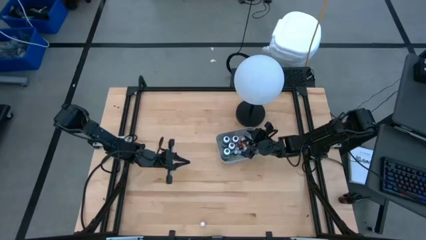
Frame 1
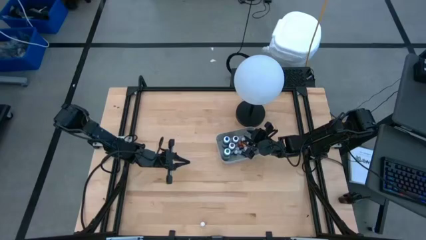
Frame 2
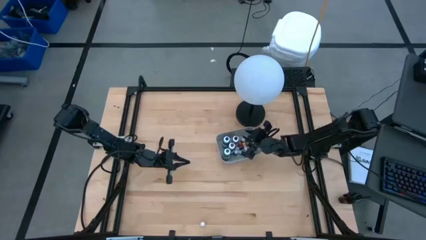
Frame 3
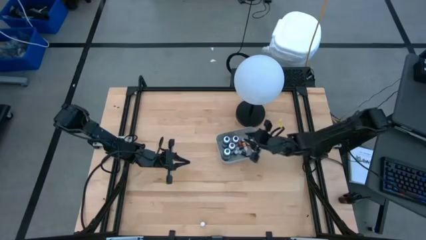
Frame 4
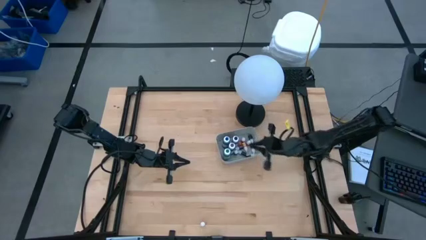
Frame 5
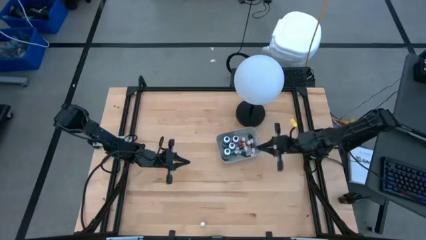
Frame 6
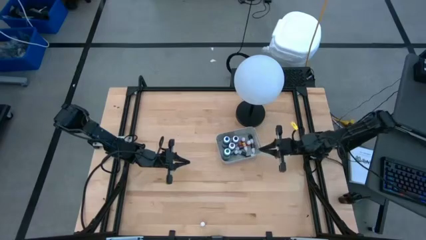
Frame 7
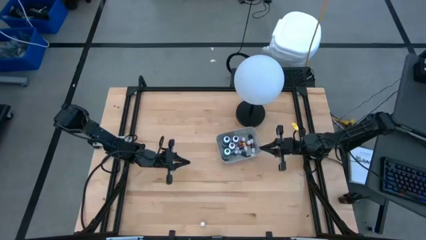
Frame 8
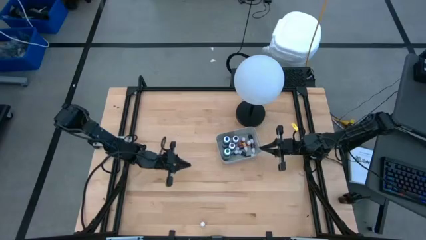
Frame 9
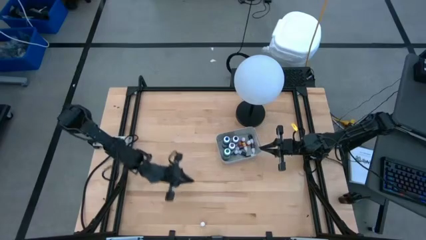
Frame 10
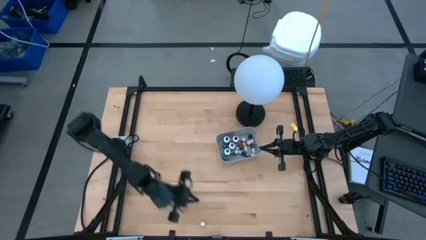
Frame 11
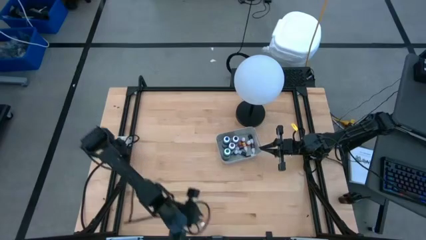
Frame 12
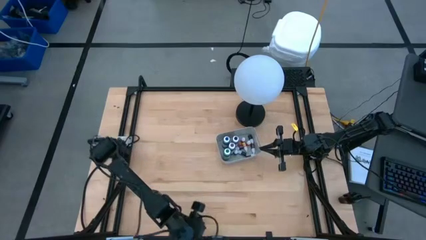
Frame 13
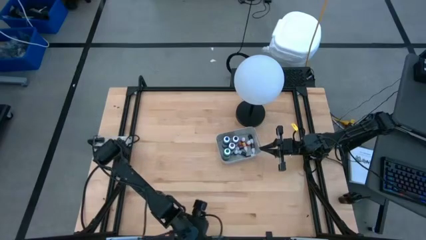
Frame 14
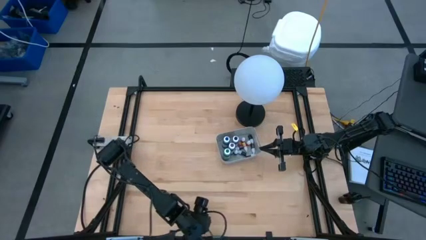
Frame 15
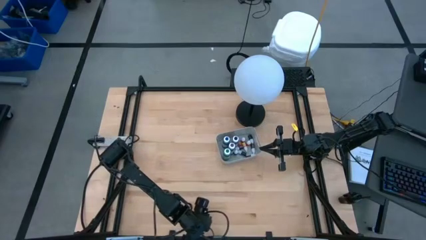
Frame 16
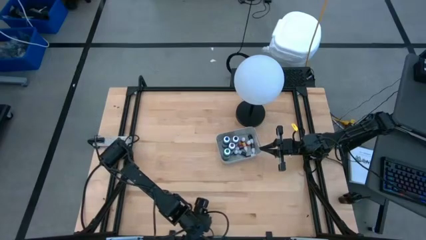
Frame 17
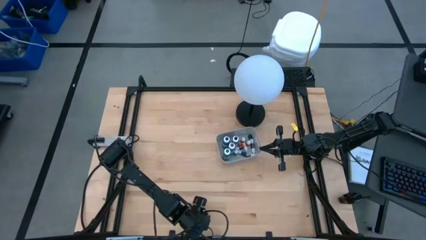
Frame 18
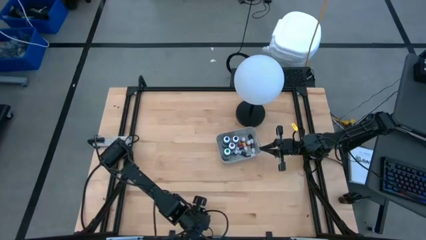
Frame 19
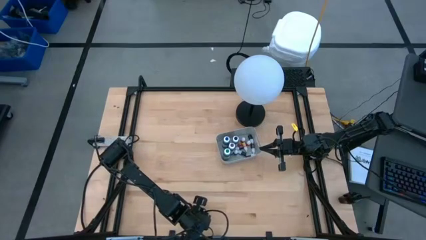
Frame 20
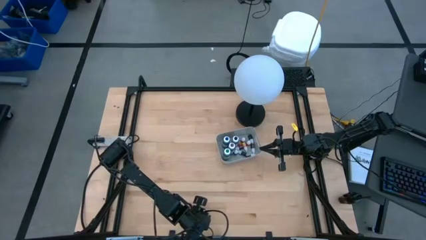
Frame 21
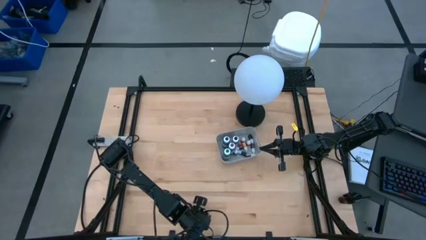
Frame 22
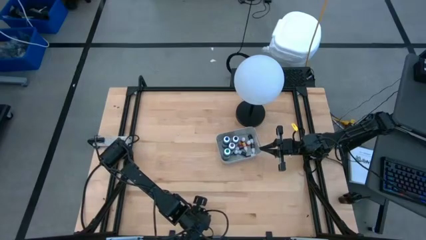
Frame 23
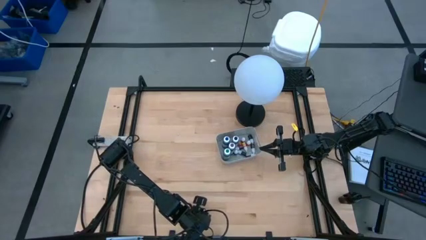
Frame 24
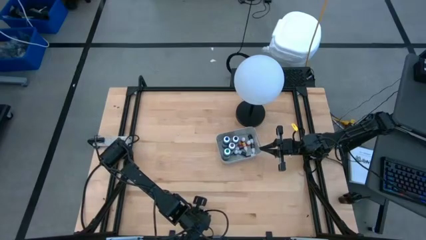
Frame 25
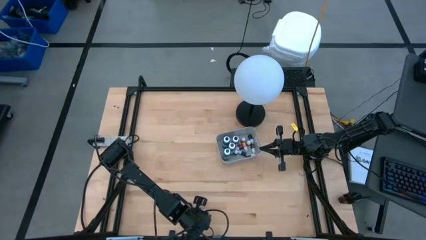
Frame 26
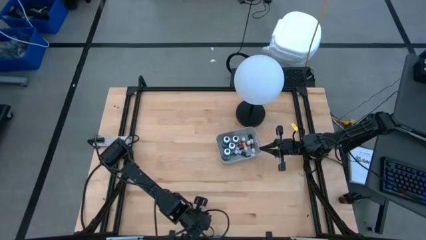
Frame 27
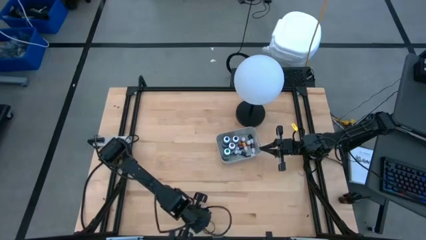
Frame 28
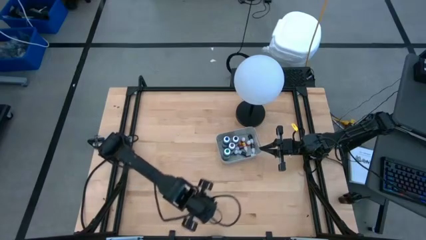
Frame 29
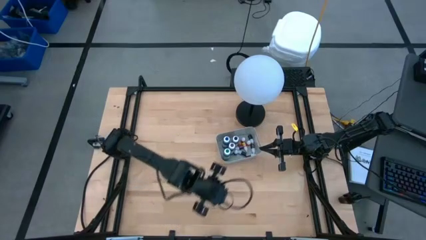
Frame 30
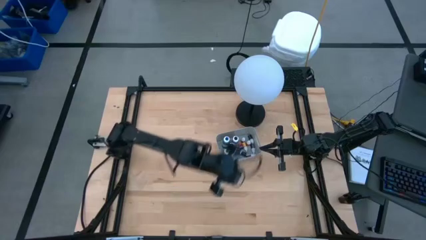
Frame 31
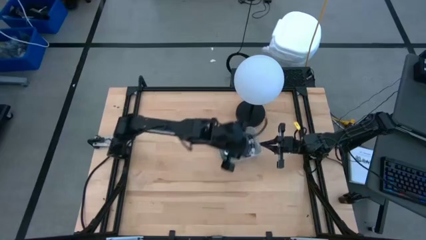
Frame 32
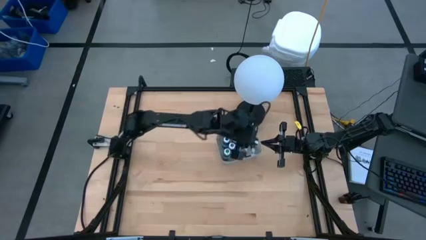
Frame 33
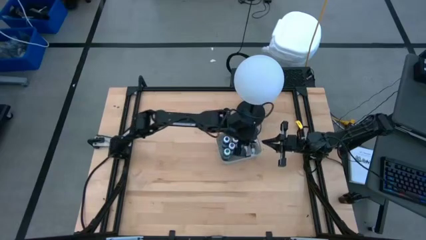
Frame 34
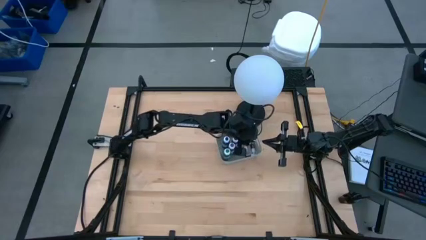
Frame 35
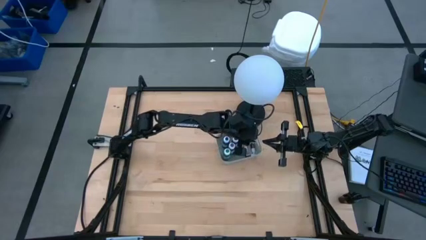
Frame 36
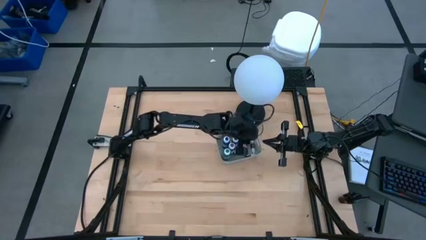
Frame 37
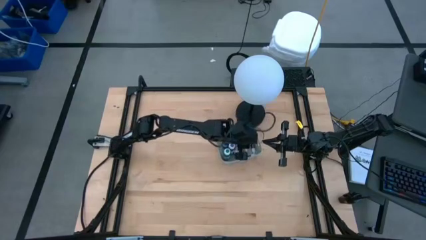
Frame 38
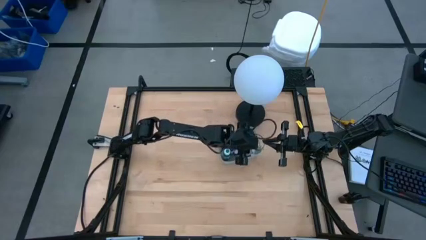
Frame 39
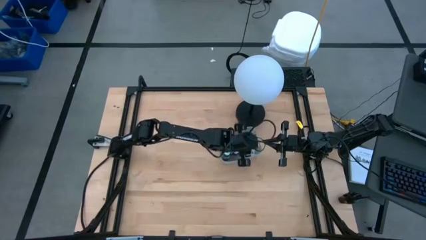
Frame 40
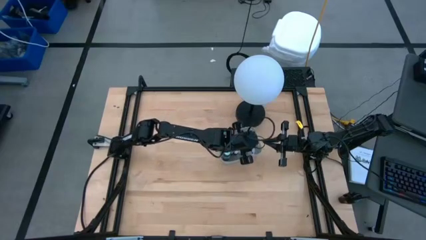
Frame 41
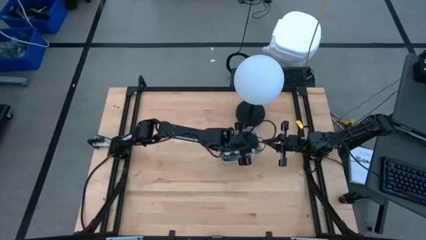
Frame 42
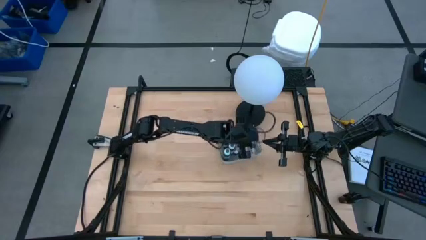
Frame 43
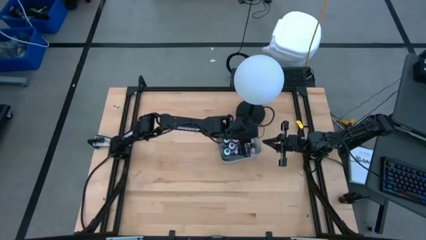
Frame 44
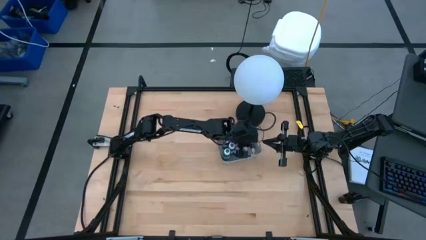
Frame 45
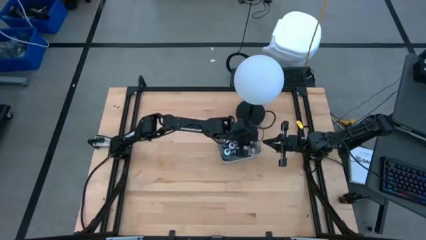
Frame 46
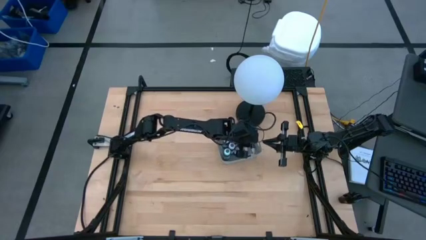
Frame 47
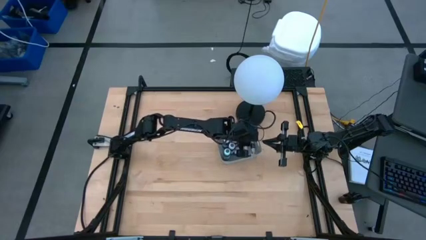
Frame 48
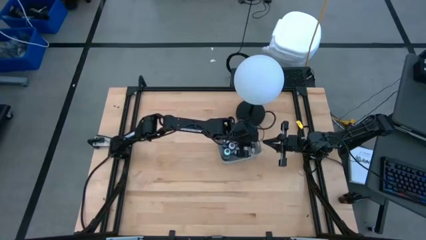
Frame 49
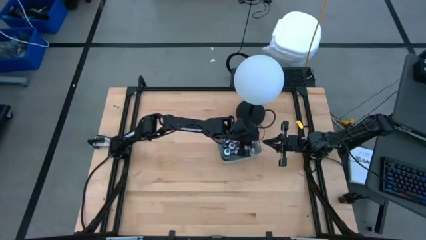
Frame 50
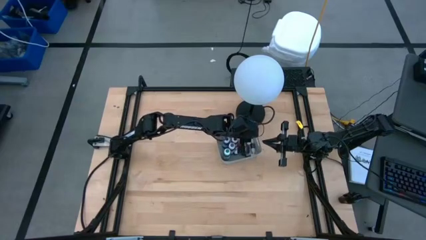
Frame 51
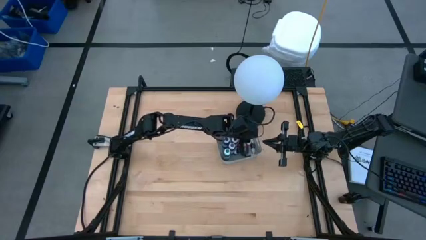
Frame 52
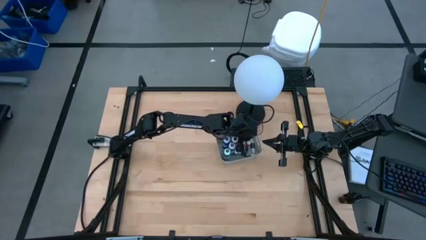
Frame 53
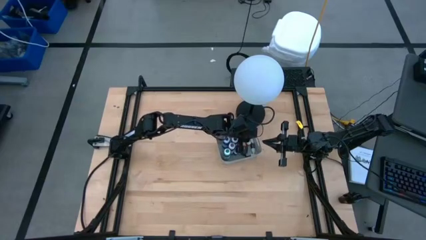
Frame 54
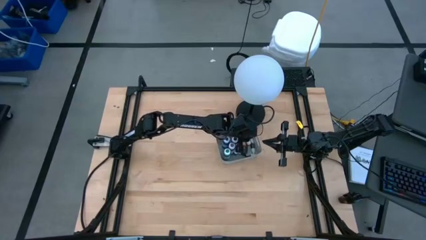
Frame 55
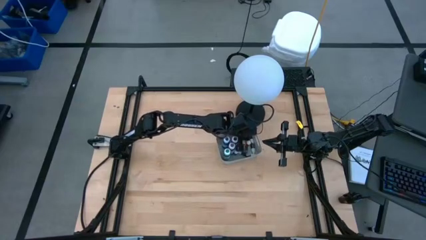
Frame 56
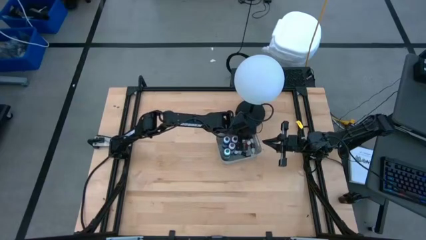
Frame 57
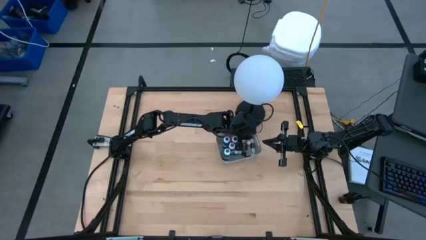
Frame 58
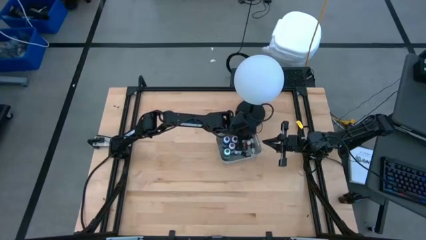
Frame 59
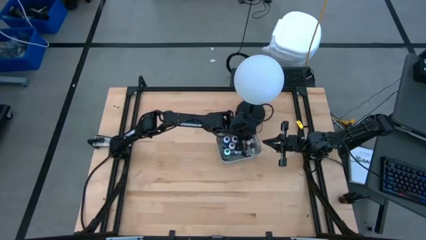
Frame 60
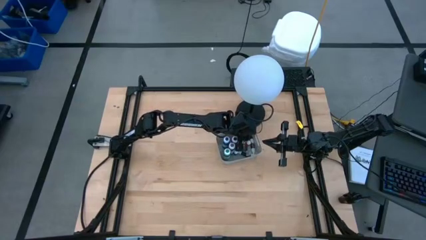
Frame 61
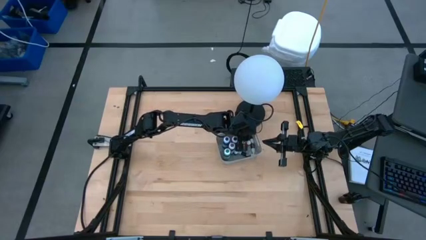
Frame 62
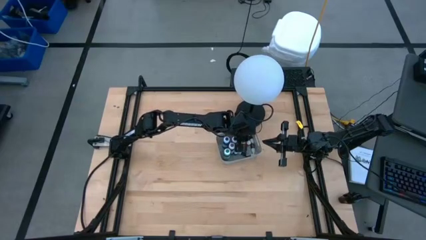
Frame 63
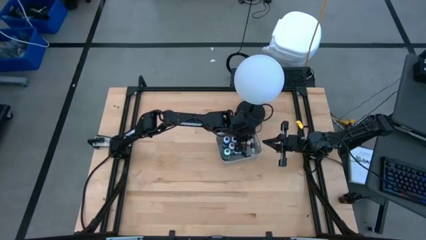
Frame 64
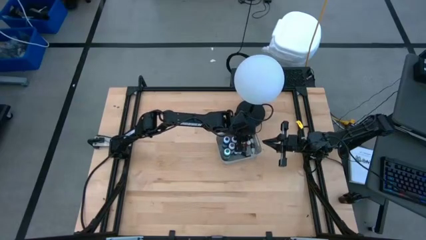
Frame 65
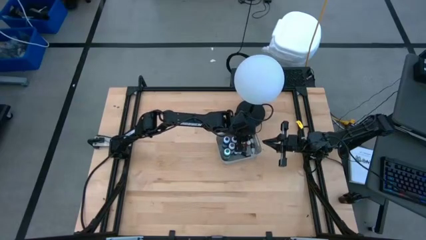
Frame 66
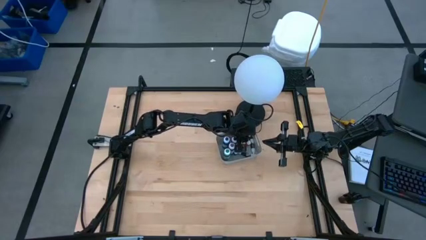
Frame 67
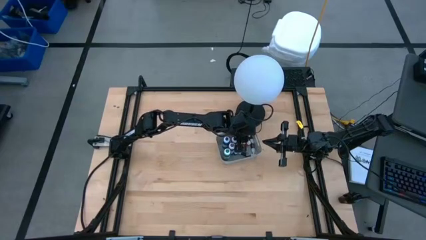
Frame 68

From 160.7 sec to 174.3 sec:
Task: Pick & Place food coloring
Put the orange food coloring bottle into the gray bin

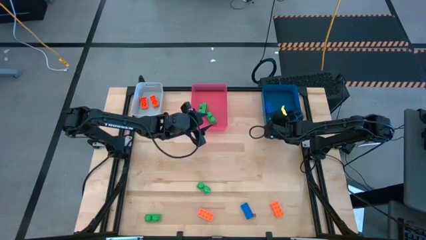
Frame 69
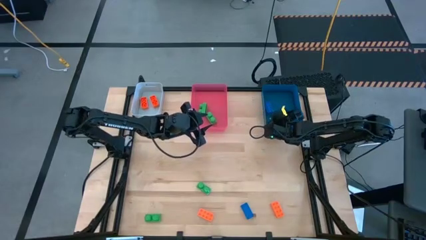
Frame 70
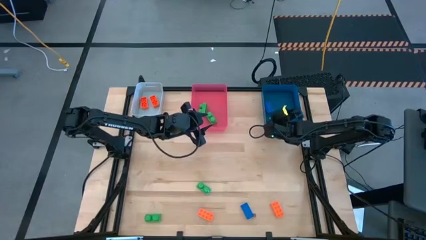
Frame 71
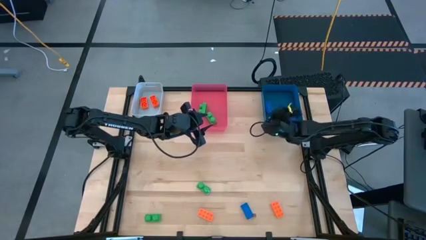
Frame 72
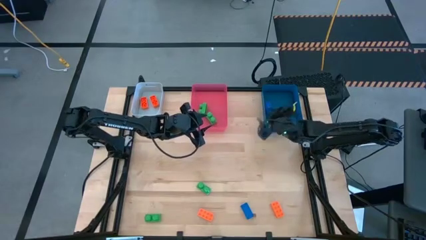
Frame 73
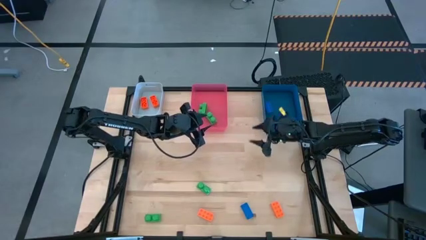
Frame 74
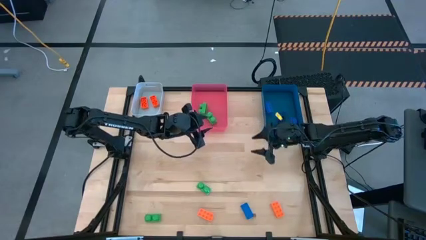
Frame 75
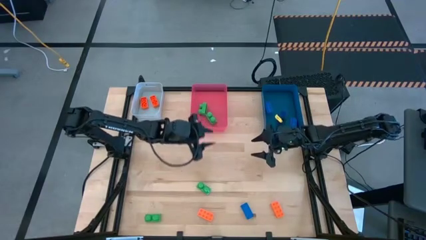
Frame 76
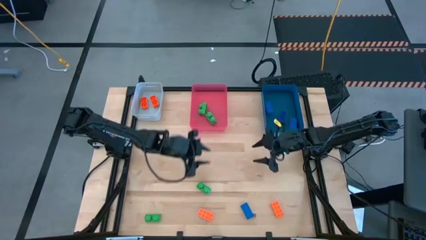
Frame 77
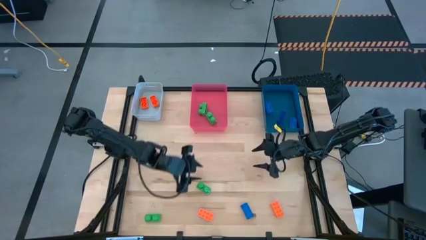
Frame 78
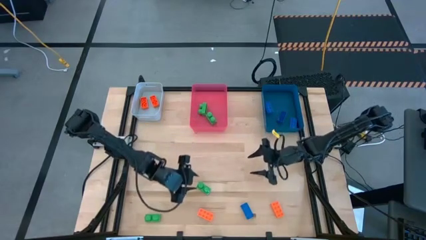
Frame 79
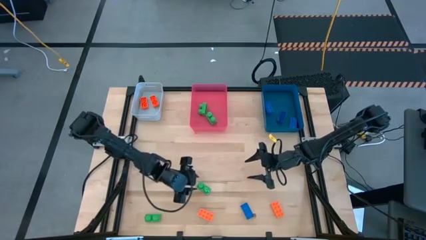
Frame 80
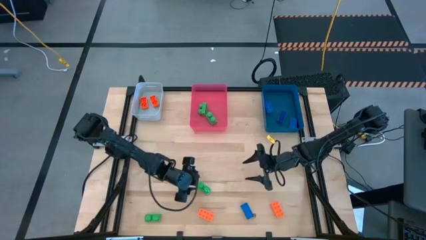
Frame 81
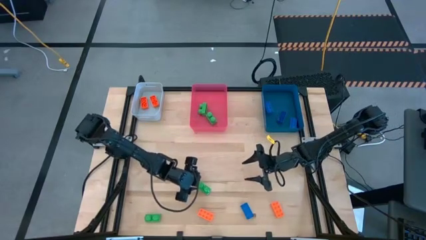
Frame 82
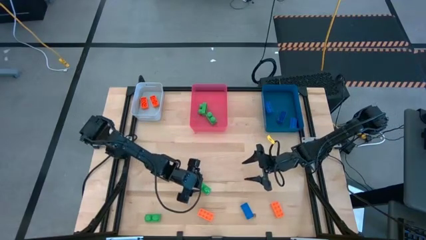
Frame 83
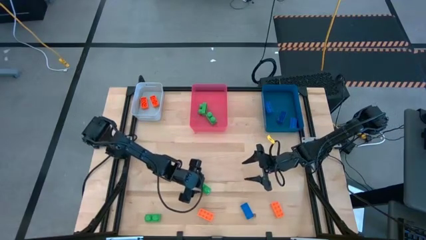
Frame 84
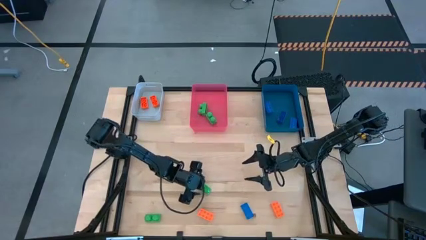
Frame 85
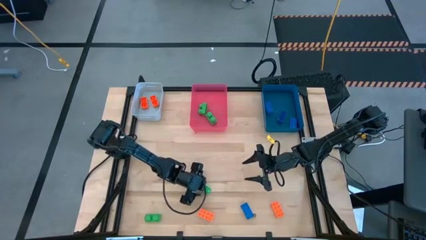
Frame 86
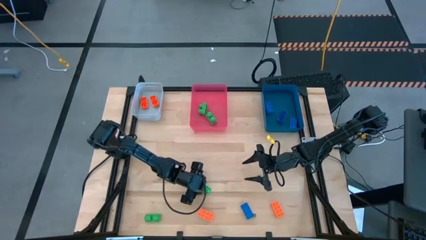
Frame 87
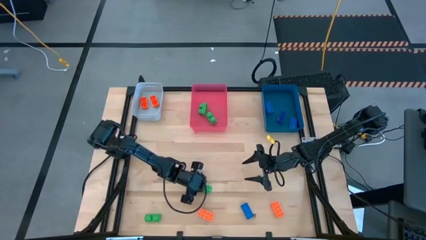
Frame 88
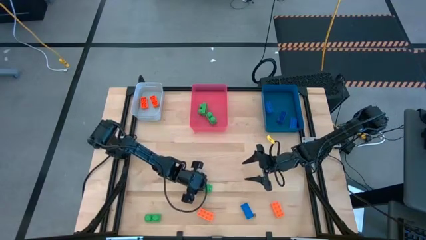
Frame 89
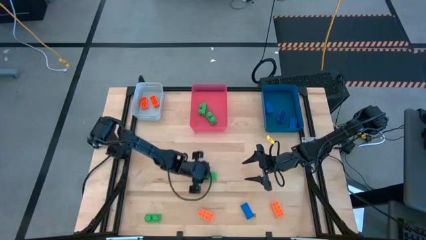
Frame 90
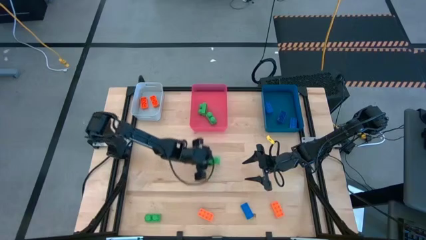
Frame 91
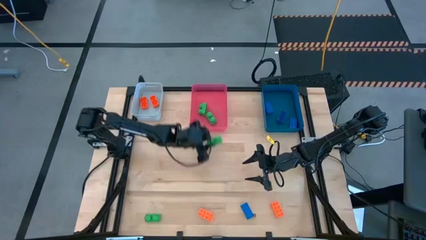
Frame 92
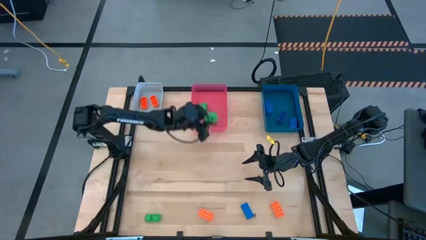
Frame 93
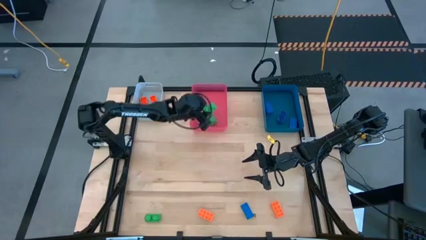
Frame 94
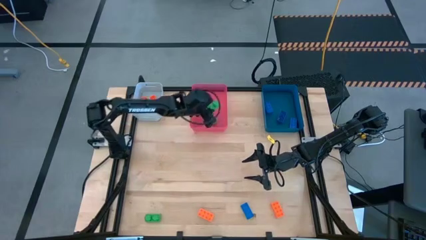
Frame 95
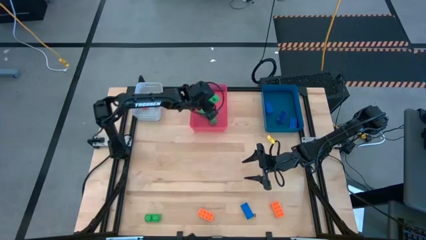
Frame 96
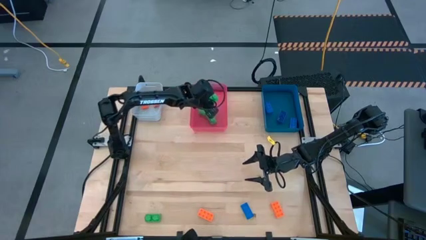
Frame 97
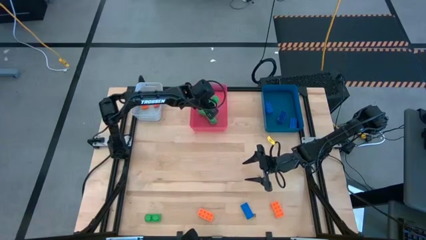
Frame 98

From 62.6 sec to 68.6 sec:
Task: Sort & place blocks by color
Put the green game piece into the pink bin
